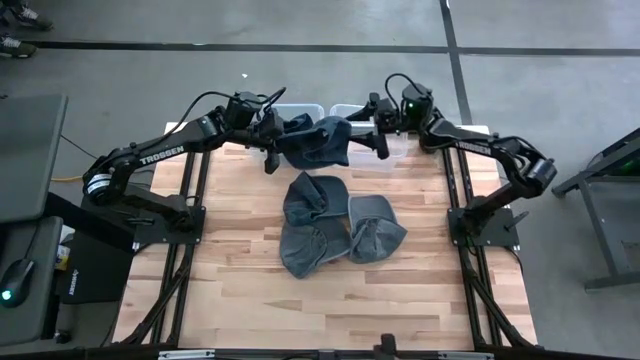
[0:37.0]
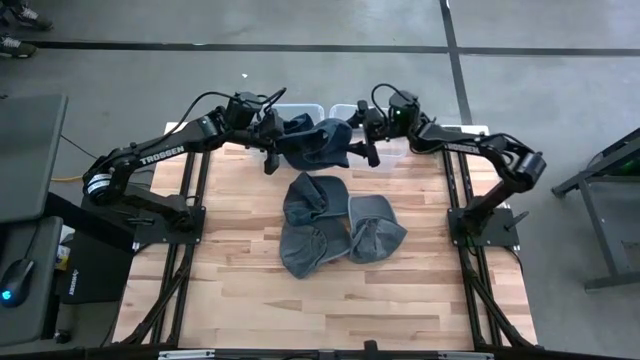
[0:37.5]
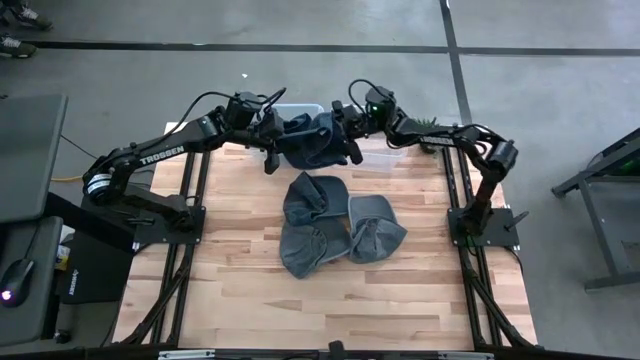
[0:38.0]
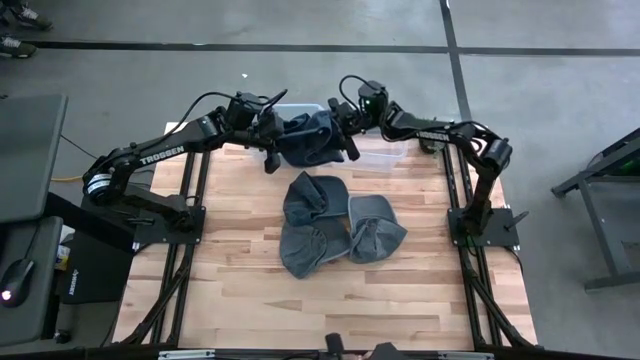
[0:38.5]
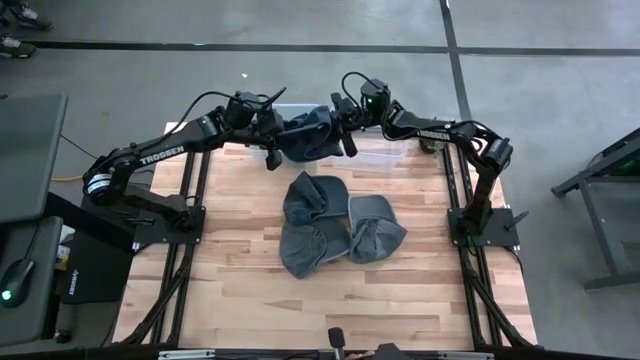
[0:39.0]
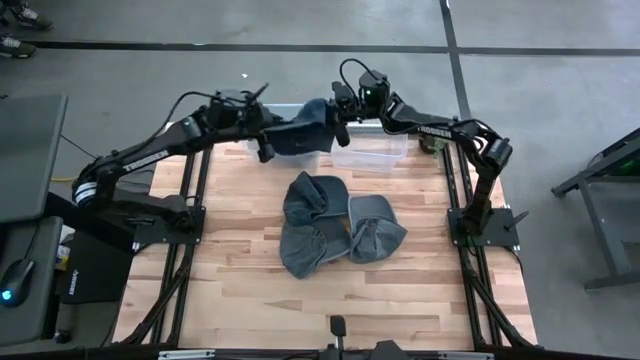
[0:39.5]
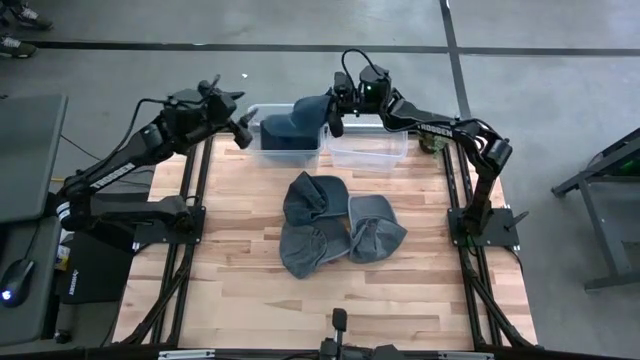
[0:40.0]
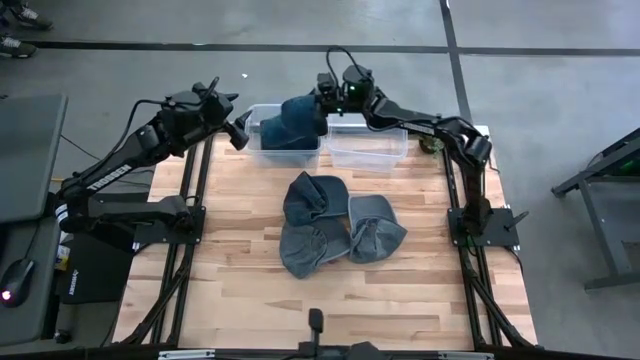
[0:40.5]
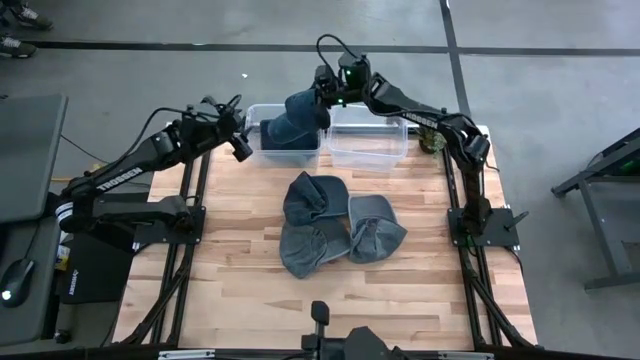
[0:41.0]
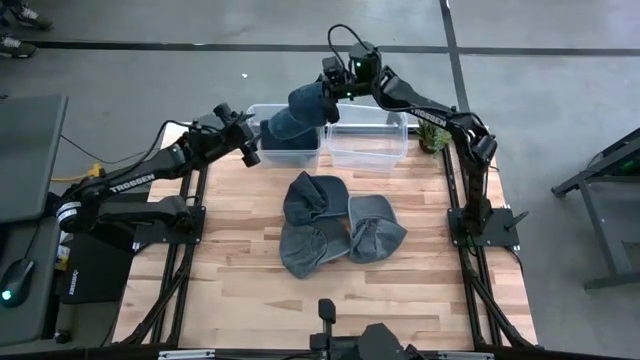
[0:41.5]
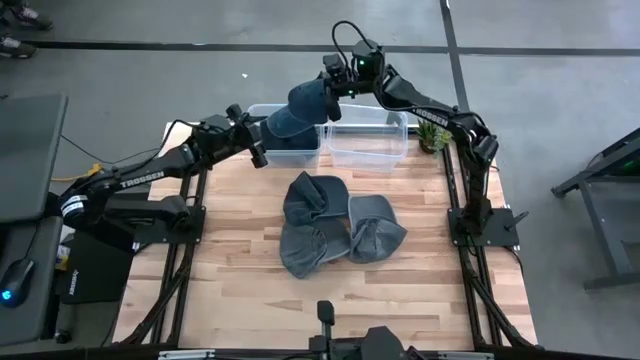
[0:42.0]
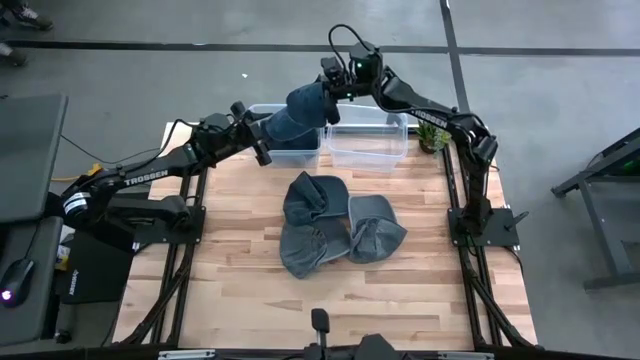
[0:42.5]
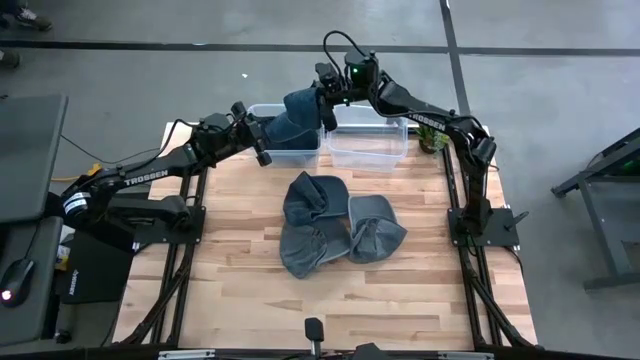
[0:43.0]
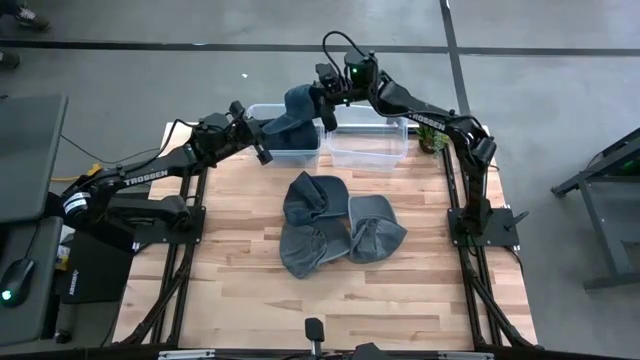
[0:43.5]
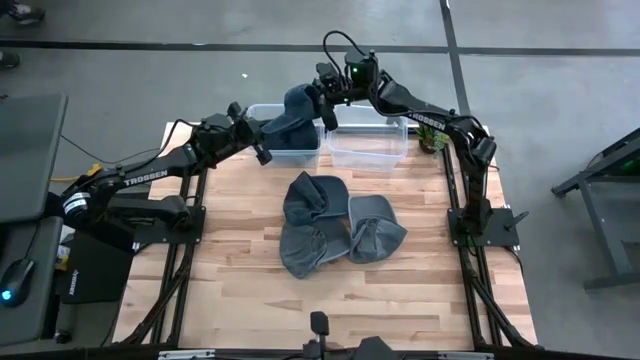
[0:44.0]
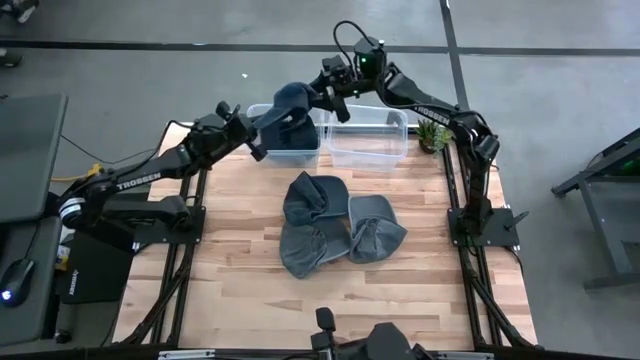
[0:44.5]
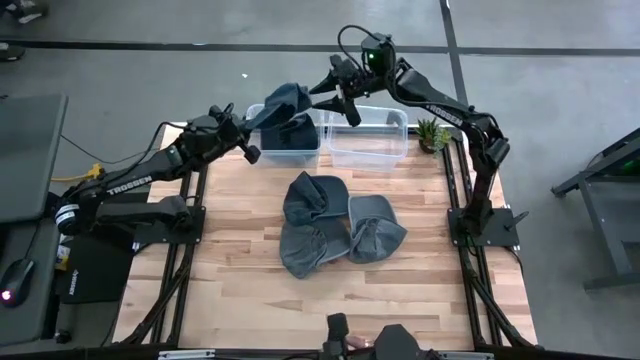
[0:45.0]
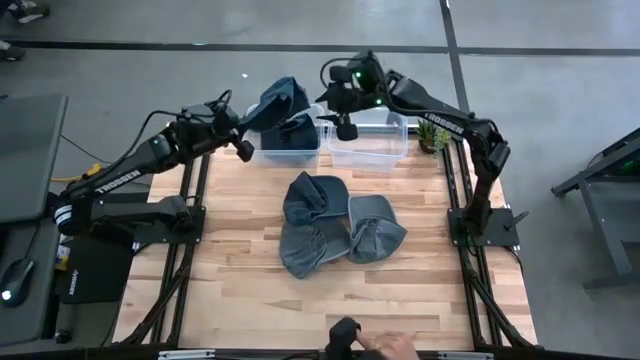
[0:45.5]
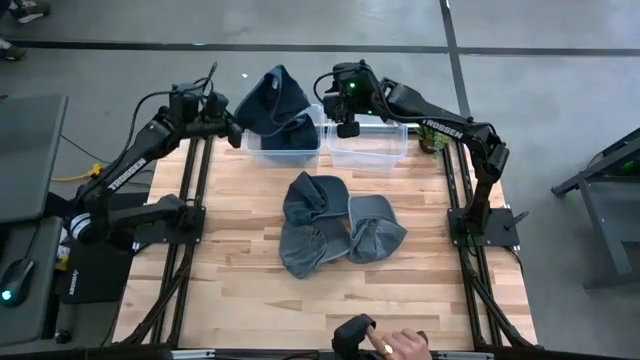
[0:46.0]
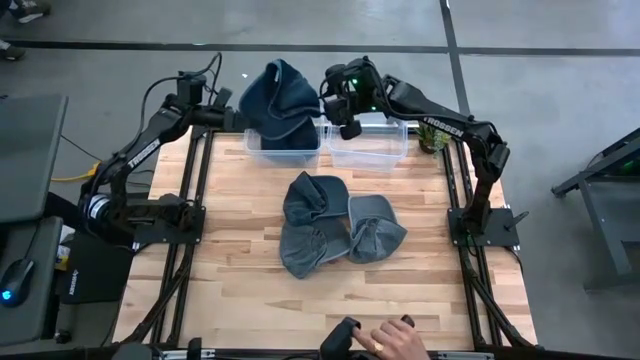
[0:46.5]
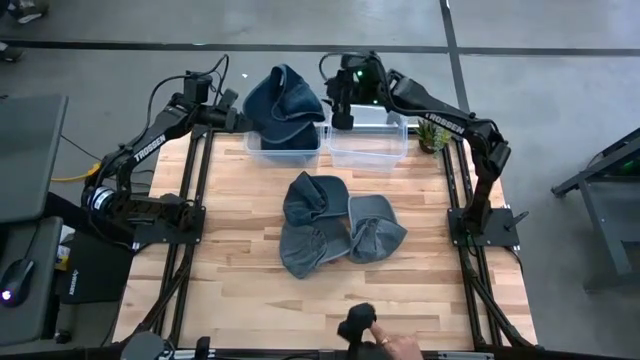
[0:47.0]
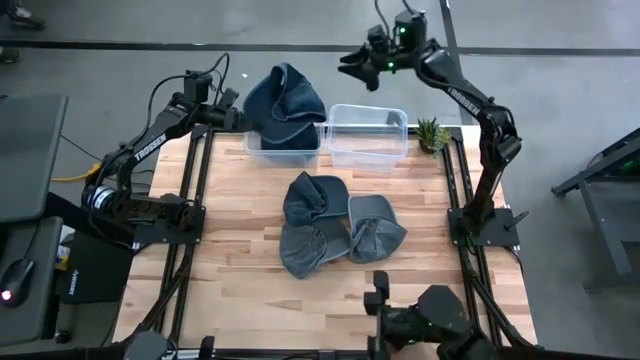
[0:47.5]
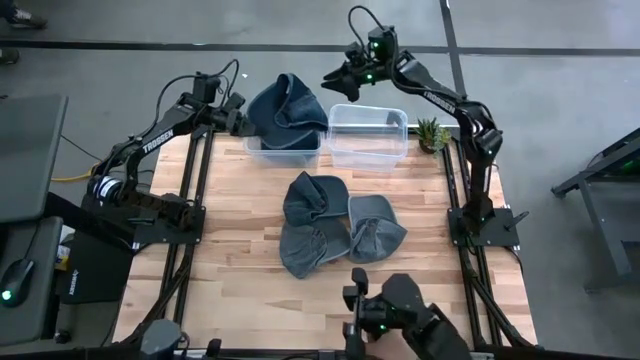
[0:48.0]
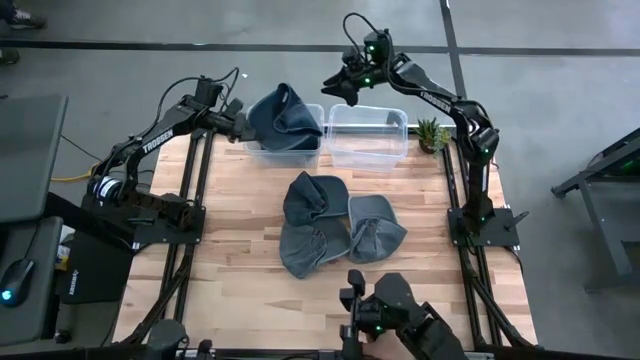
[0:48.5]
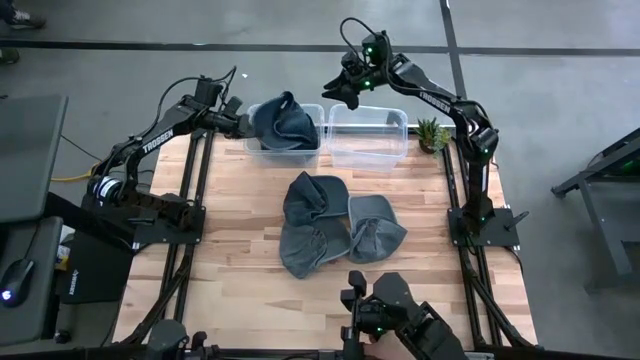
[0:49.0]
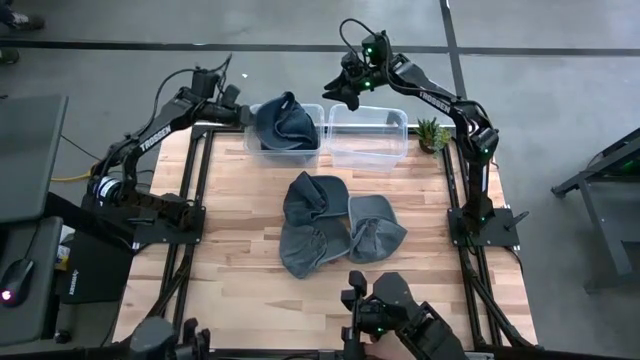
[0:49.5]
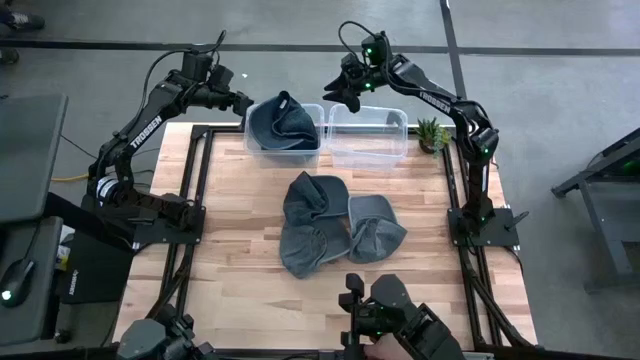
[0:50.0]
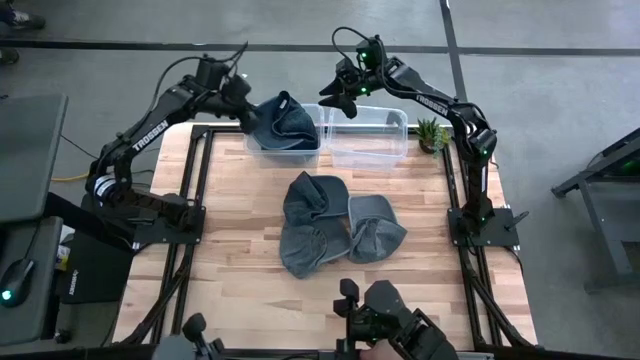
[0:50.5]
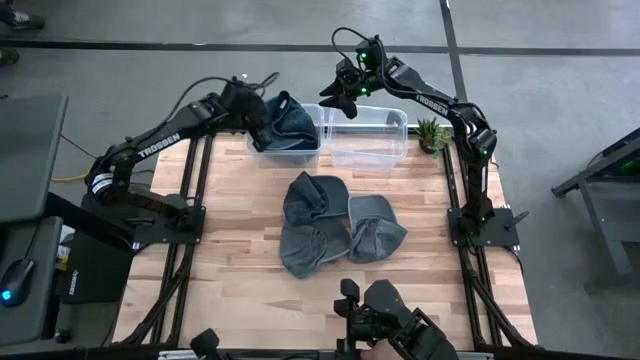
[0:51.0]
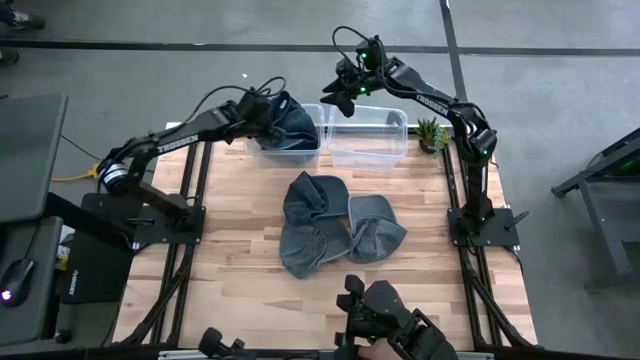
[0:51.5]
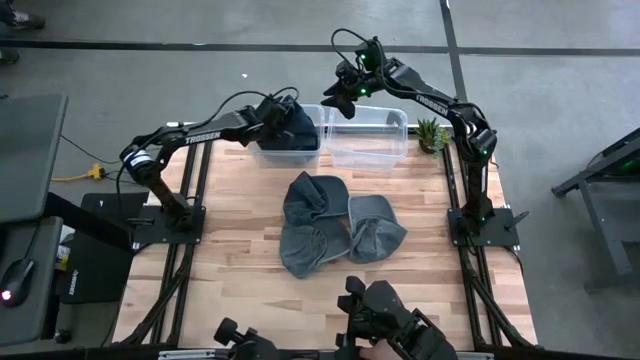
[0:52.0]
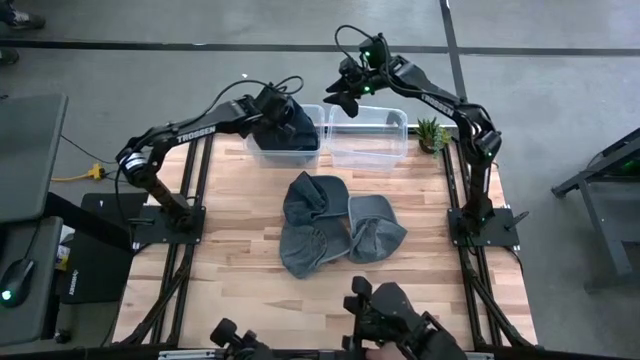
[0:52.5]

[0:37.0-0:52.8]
Task: Pick and place caps into container
Put the bottom dark blue cap into the left transparent container

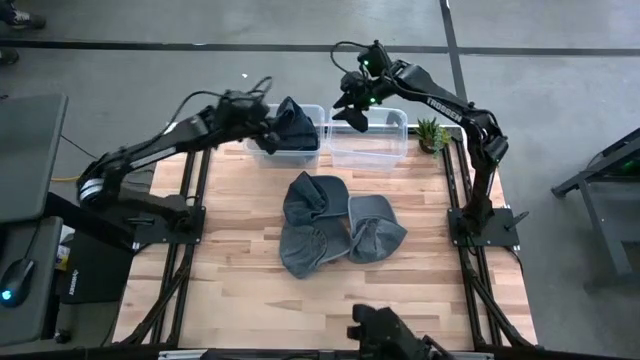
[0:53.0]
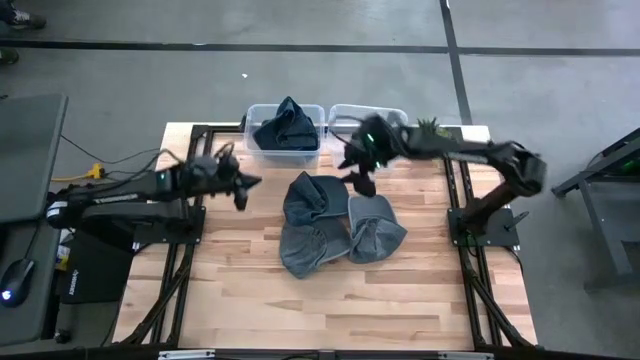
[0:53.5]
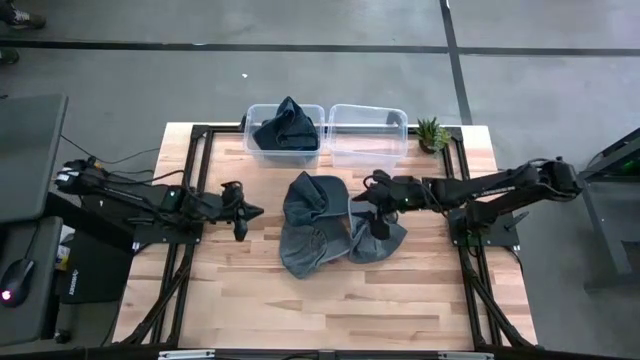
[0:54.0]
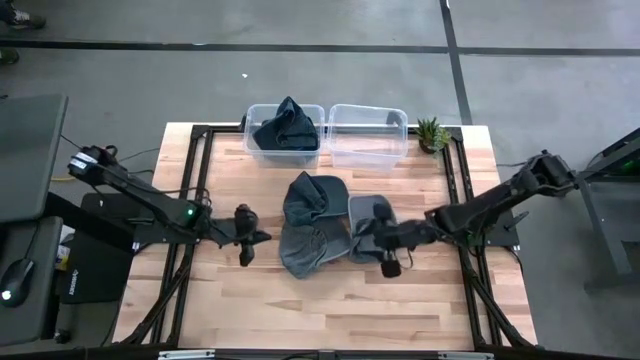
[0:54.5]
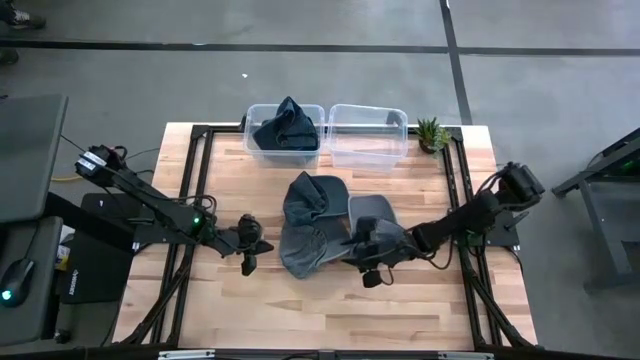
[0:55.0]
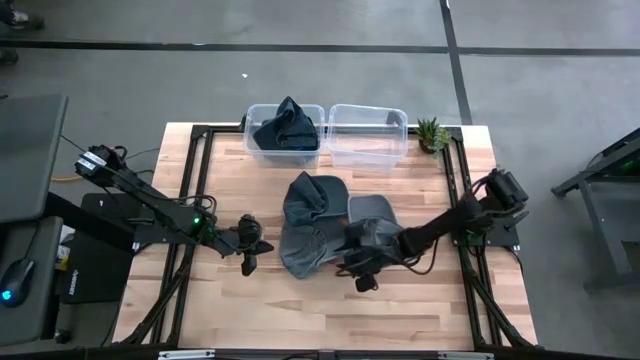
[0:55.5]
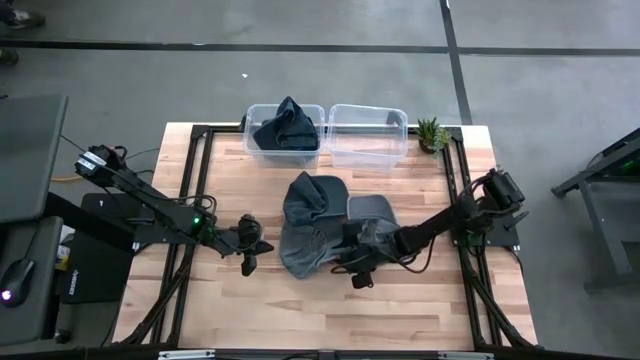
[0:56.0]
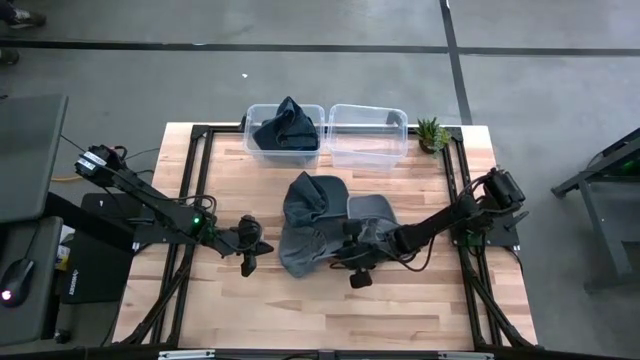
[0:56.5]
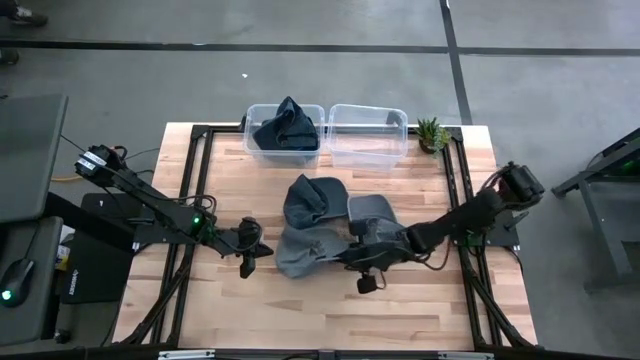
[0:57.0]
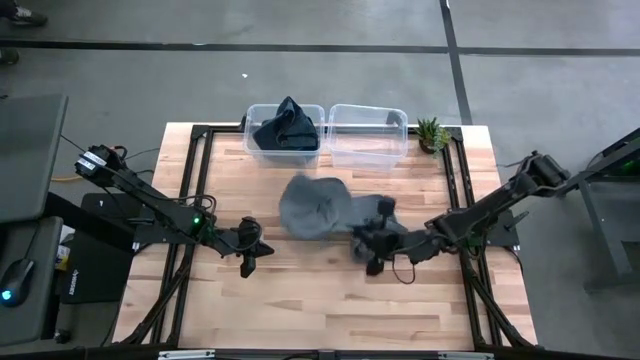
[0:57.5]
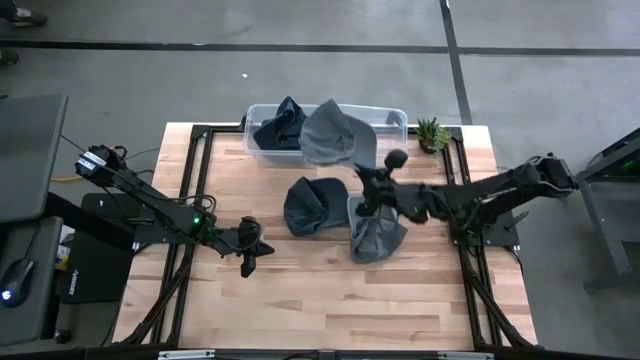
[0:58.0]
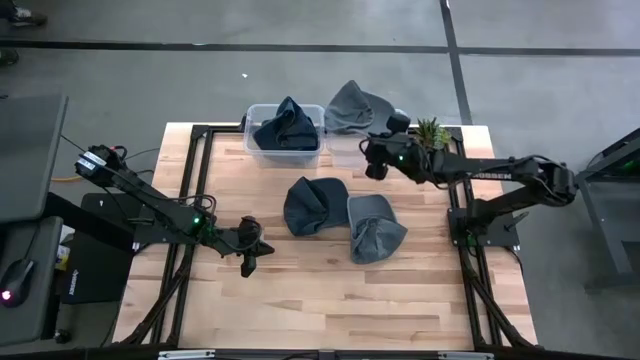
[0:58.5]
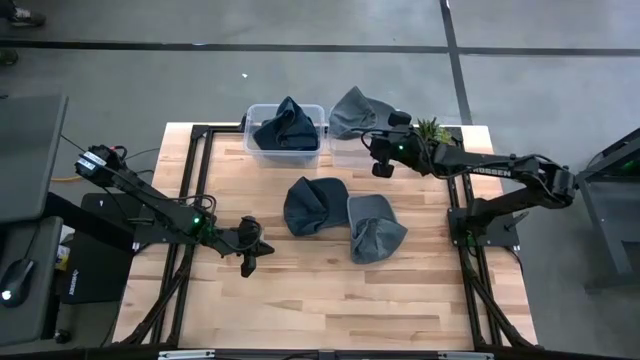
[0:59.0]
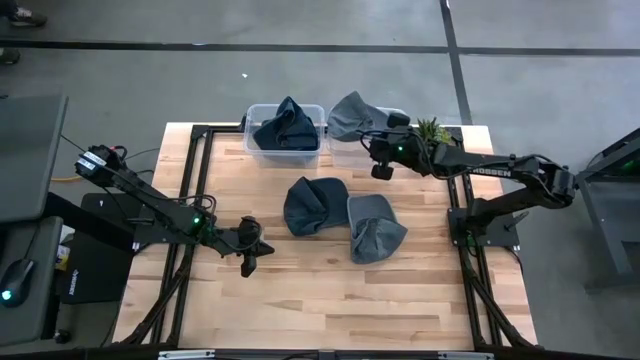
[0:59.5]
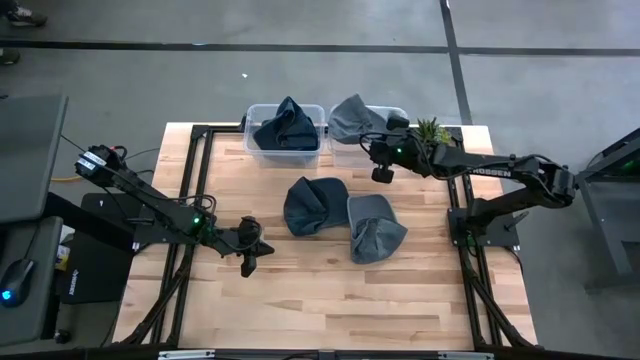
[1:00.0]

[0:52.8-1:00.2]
Put the left gray cap into the right transparent container
